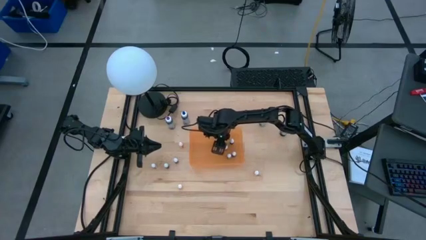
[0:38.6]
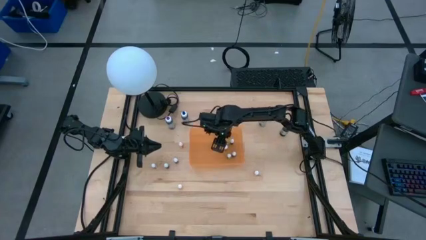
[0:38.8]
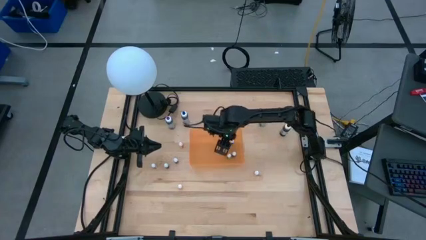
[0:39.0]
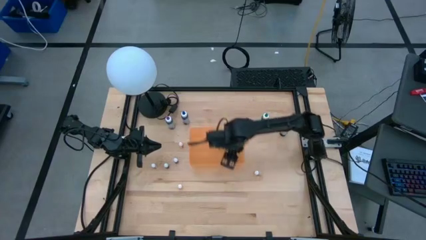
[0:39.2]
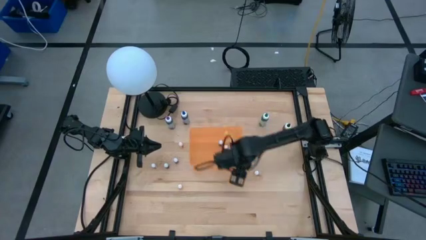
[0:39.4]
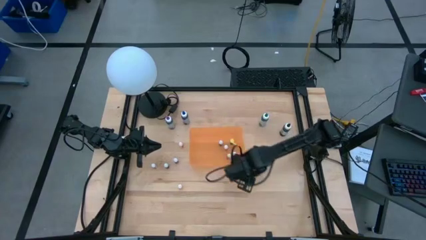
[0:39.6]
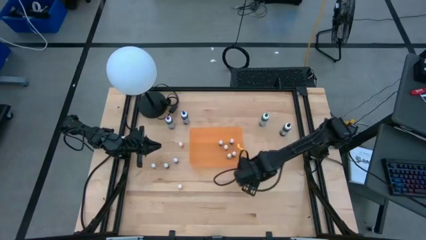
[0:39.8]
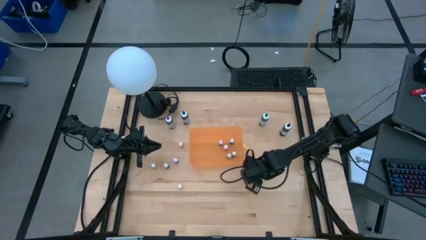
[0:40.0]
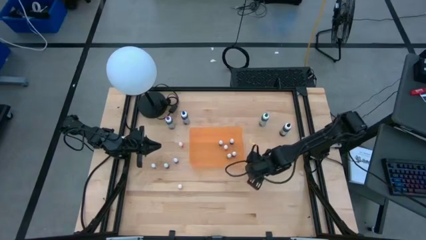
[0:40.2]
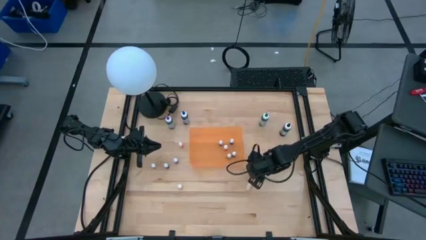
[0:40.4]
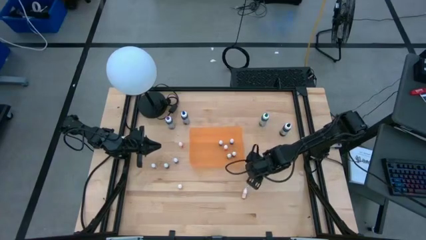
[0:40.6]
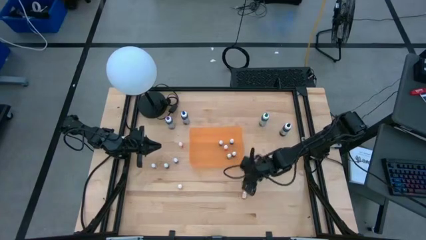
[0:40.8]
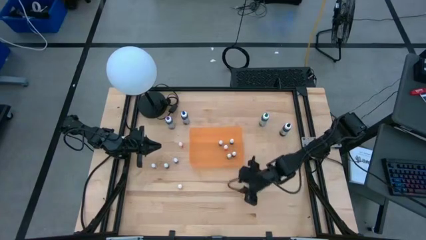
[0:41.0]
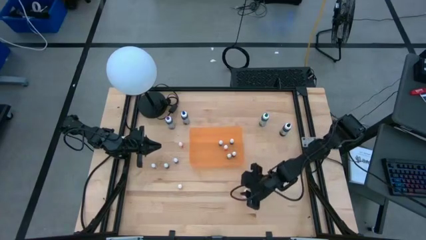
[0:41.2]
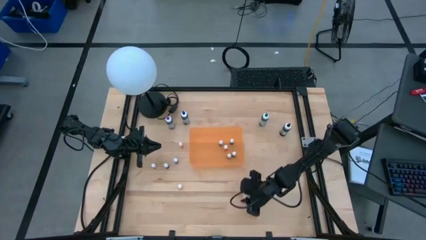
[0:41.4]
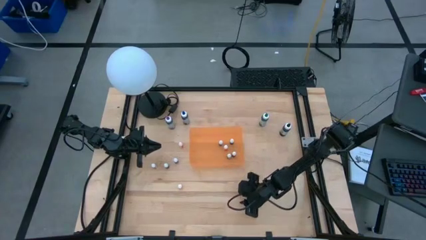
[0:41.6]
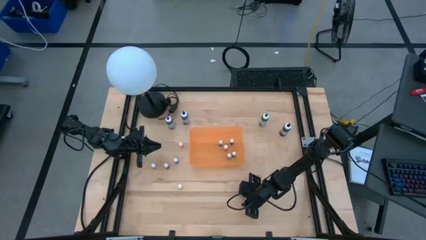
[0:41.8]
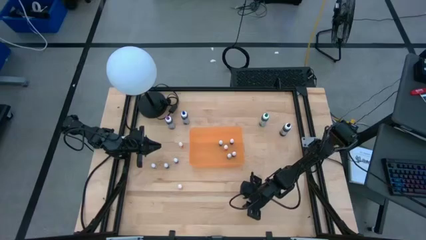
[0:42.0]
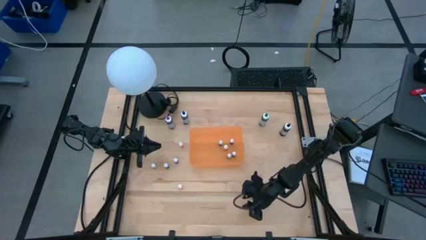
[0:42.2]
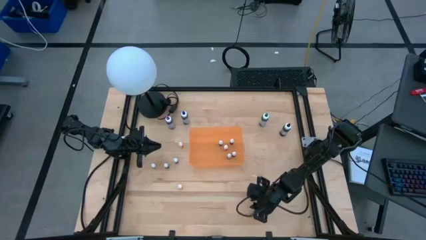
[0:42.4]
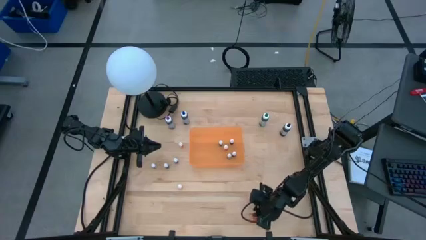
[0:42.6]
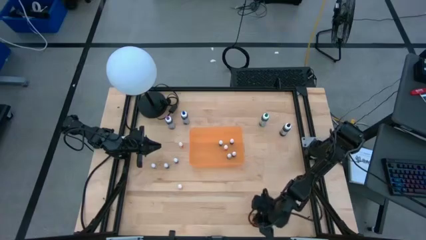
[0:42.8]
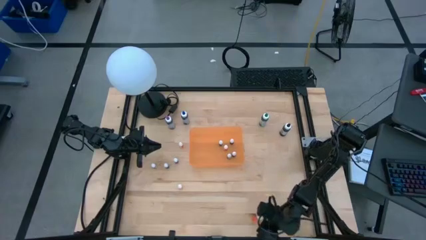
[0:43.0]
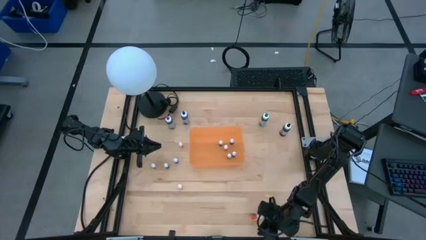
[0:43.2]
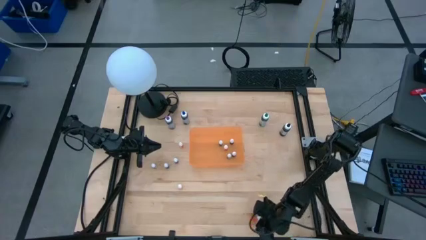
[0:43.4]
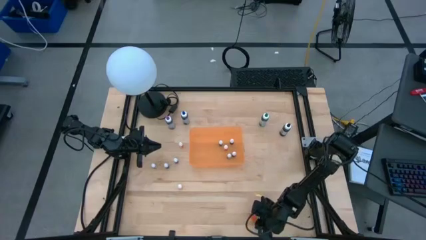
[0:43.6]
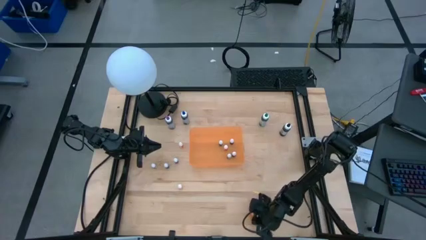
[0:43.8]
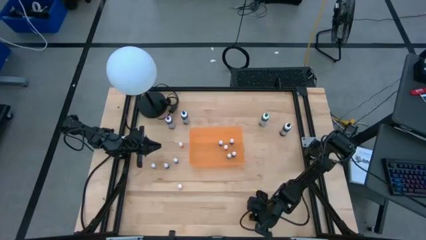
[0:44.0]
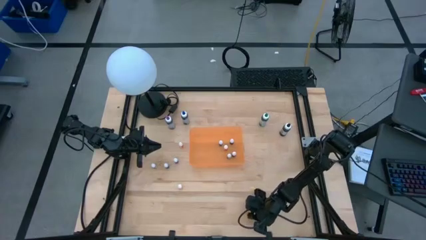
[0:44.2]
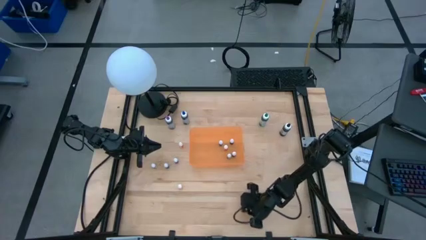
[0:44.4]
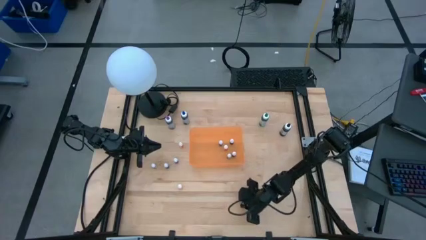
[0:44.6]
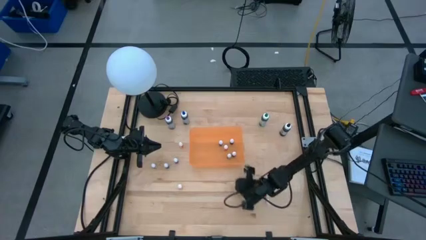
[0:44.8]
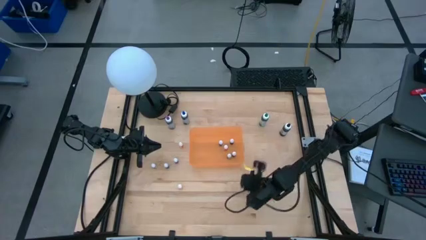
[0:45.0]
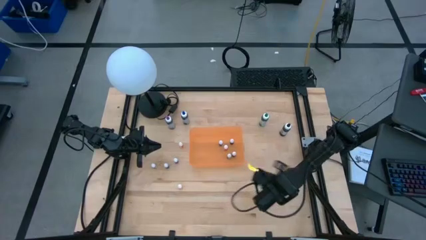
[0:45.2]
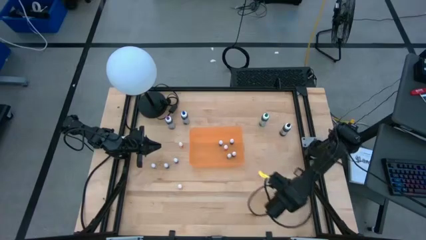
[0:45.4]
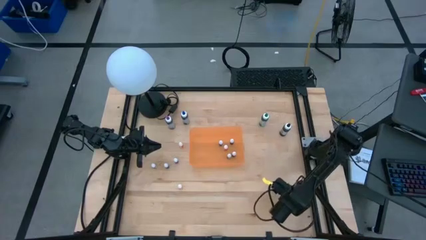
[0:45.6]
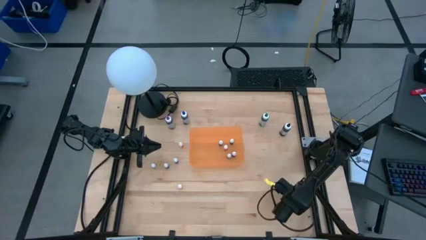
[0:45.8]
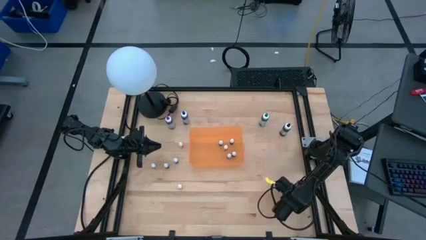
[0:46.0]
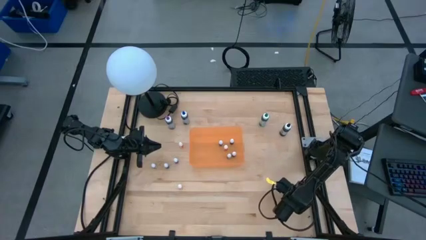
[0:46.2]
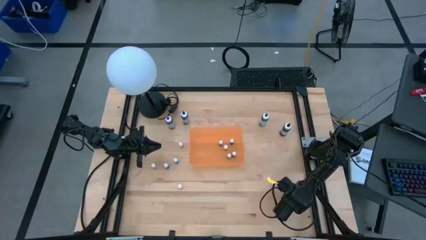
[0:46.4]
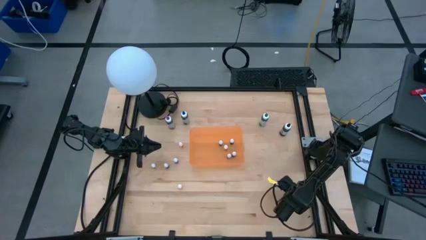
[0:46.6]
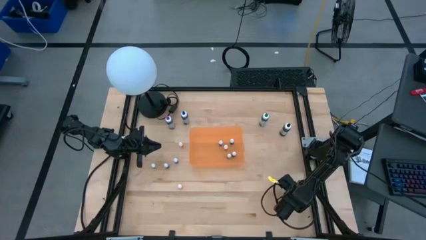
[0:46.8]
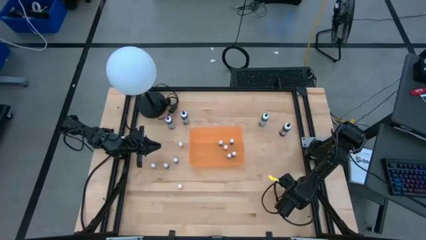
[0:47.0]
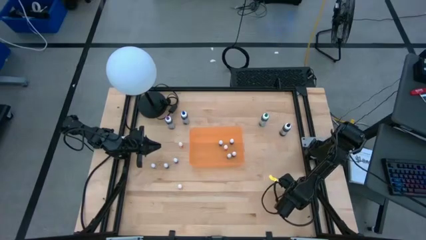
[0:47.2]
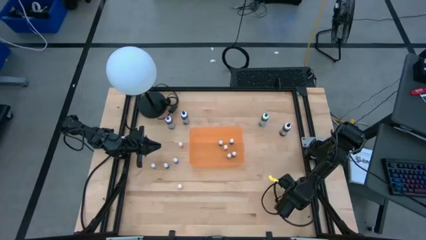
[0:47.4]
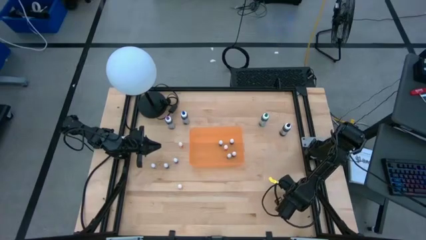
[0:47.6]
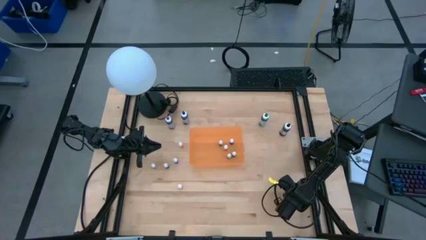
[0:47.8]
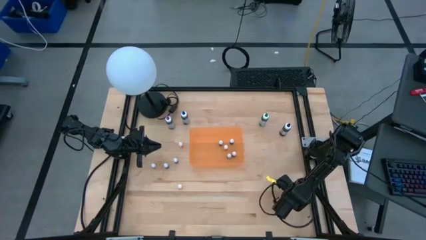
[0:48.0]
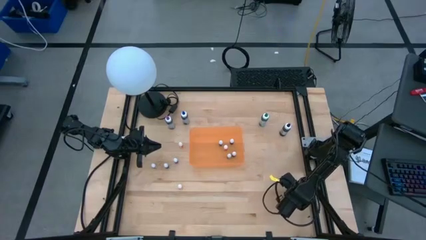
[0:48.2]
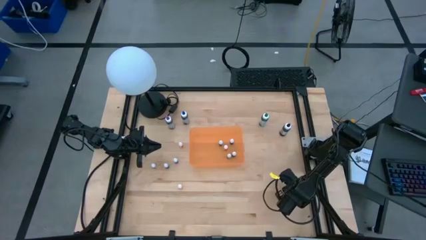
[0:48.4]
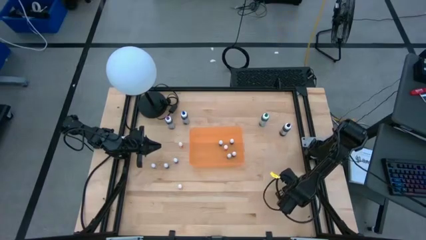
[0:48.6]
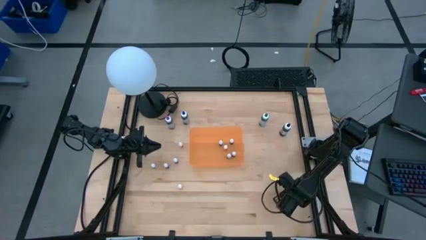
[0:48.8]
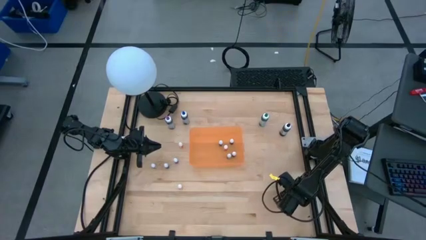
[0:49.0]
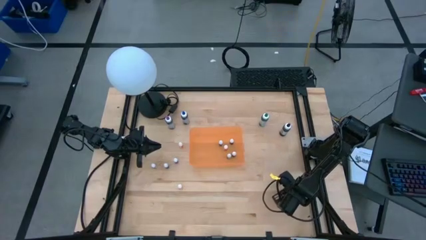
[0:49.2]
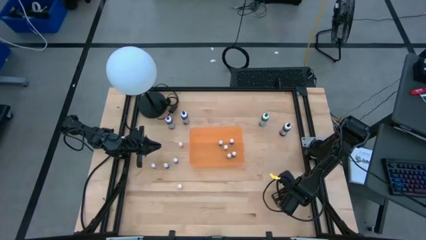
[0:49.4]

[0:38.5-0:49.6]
Task: Pick & Place food coloring
Put the small orange food coloring bottle into the orange bin

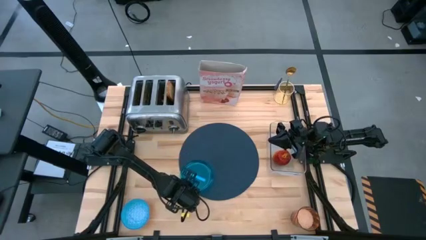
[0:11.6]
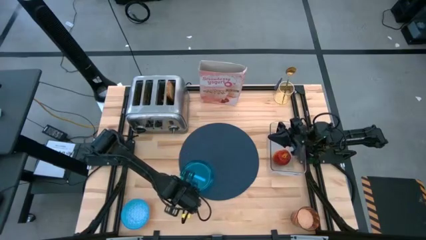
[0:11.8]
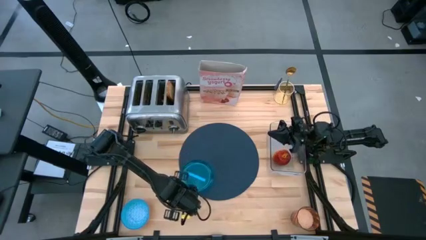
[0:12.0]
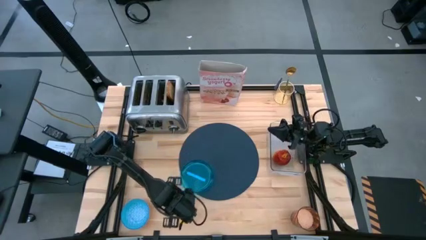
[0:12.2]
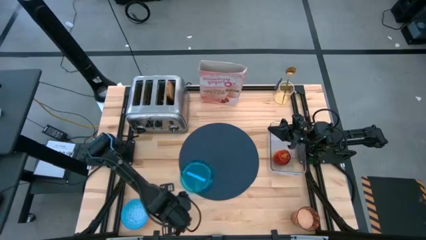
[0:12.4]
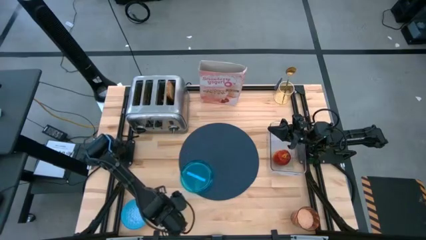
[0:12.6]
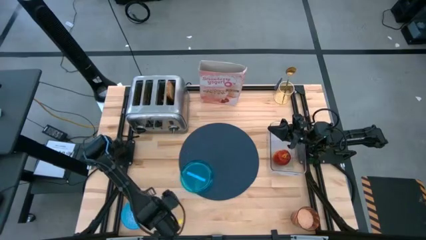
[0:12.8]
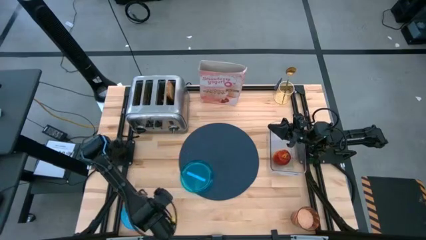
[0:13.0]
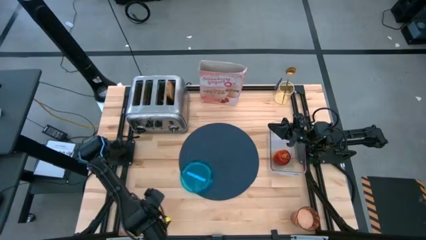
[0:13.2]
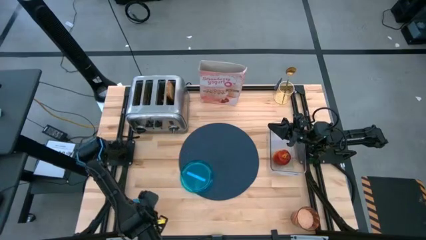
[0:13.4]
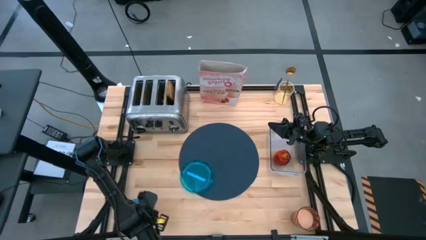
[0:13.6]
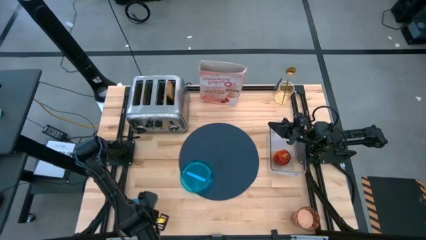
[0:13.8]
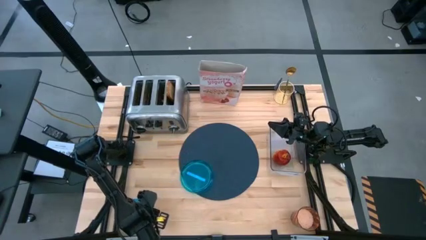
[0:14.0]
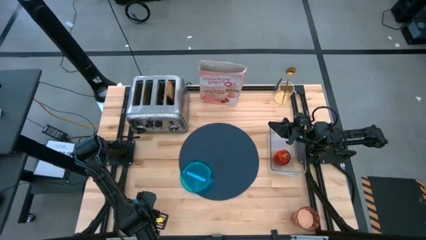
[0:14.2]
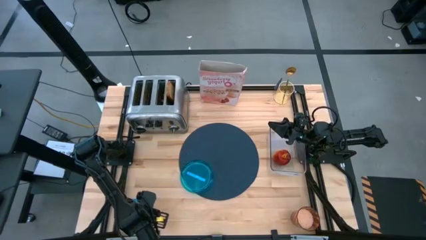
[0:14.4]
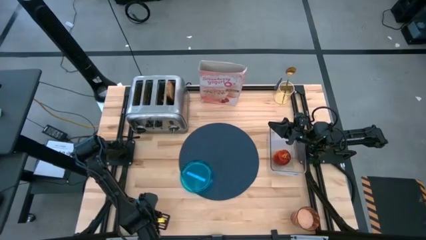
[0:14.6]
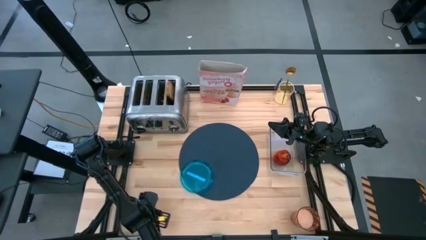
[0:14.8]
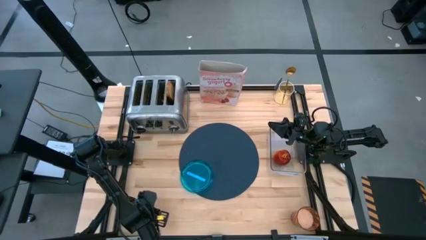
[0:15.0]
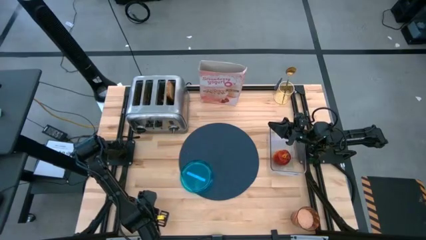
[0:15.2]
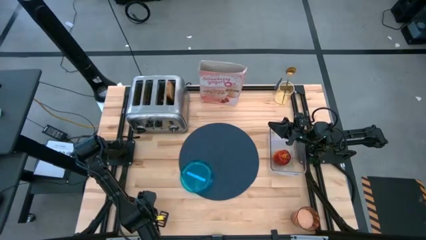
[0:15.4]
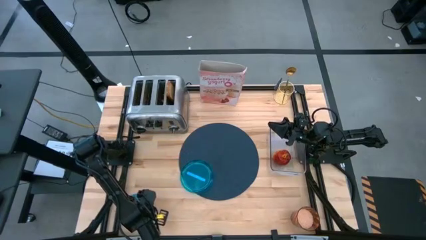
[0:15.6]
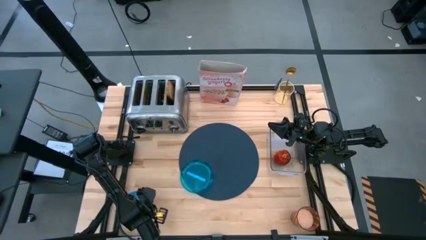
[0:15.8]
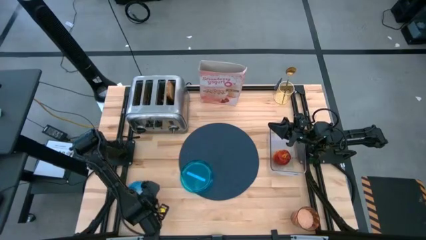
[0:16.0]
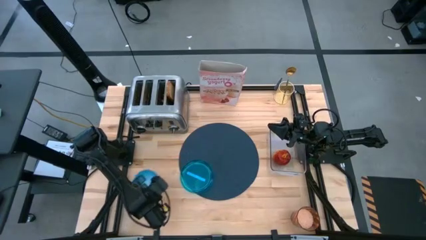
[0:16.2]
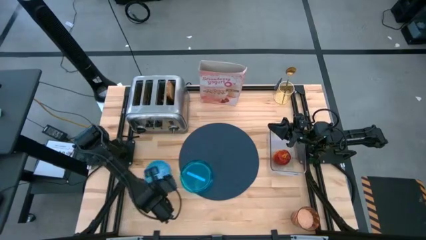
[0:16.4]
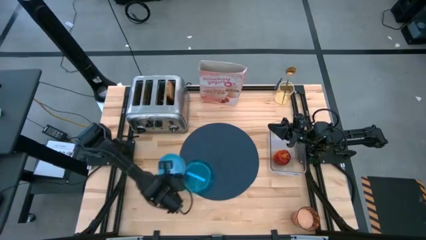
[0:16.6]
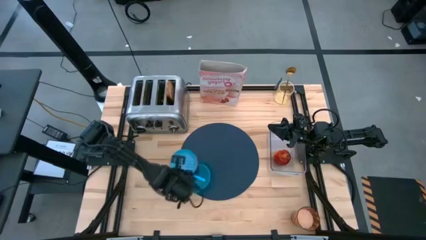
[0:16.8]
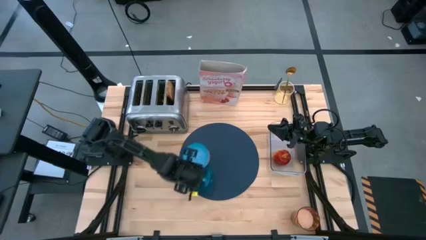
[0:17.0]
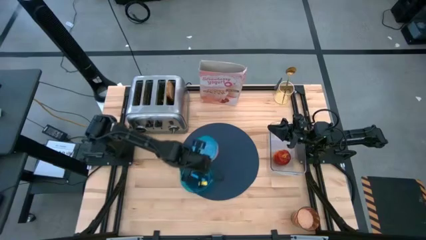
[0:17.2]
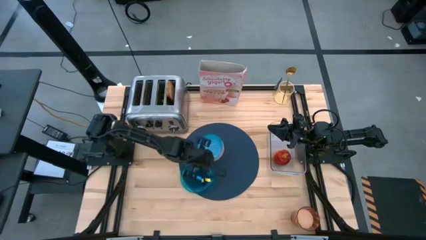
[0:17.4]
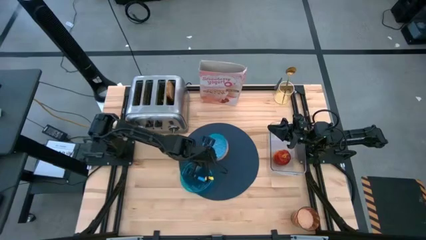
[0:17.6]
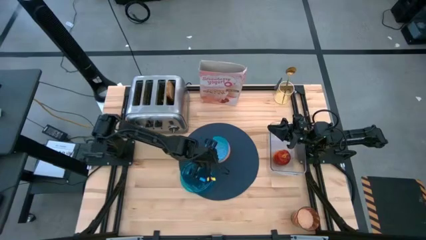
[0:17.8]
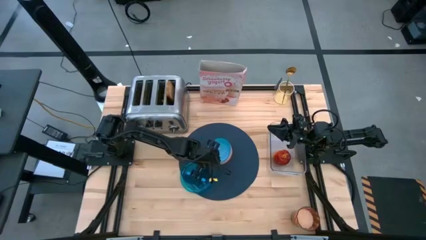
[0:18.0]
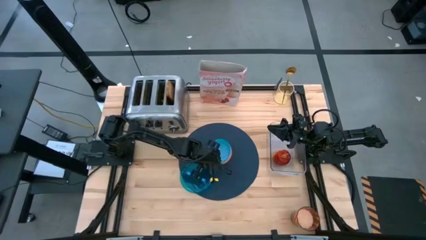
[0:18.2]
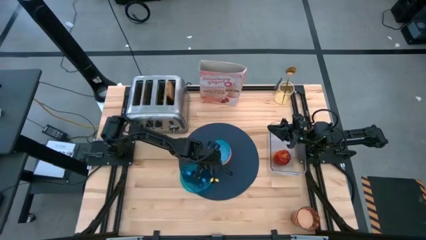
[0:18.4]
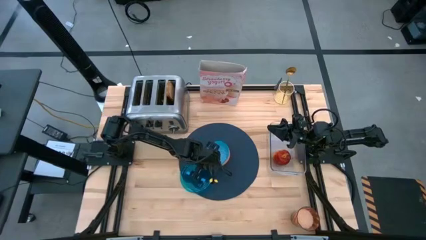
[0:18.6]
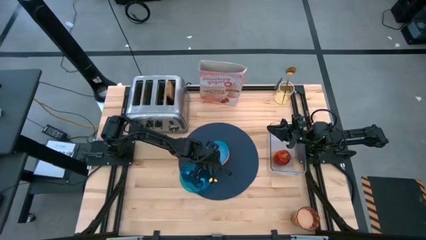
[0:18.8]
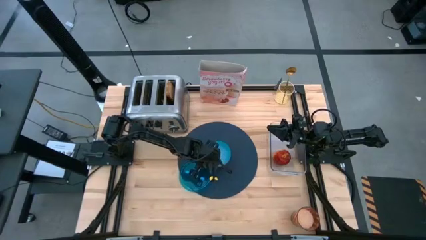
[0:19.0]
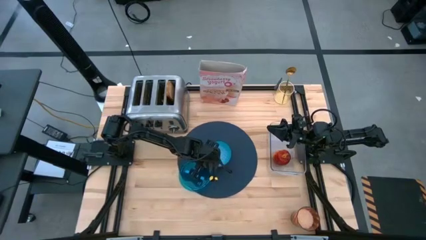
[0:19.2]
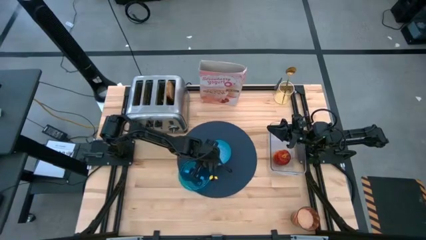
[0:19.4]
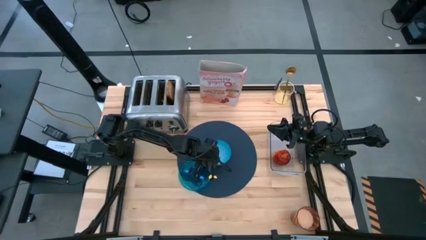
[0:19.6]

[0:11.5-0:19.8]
Task: Arrange a breakfast setting
Put the blue bowl on the blue table table mat to the top right of the blue plate
